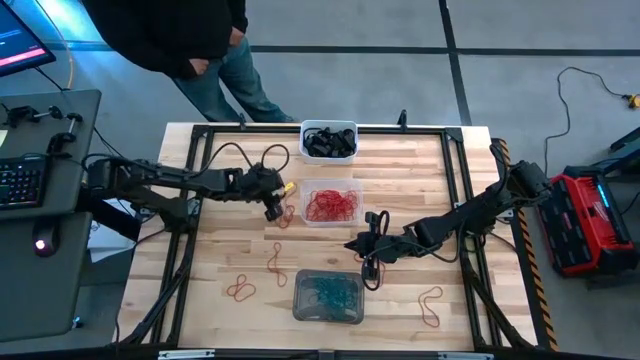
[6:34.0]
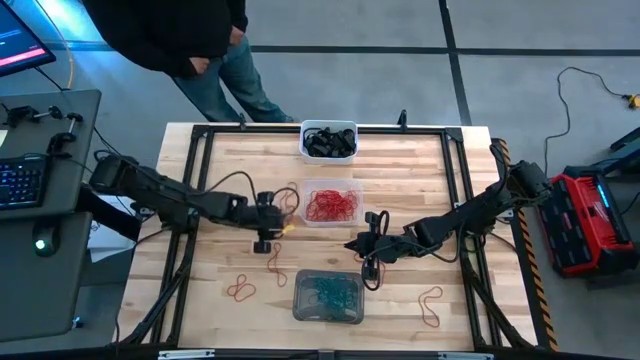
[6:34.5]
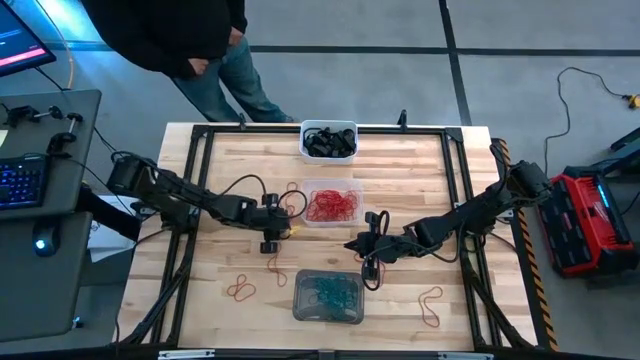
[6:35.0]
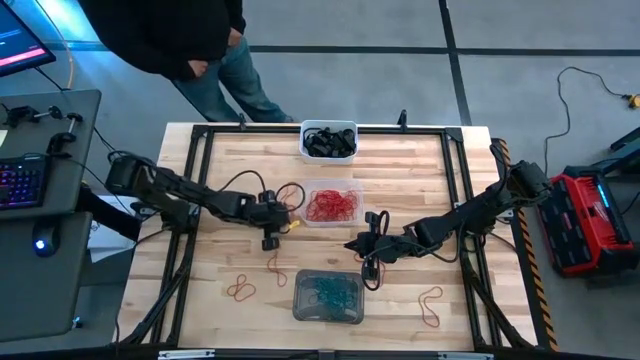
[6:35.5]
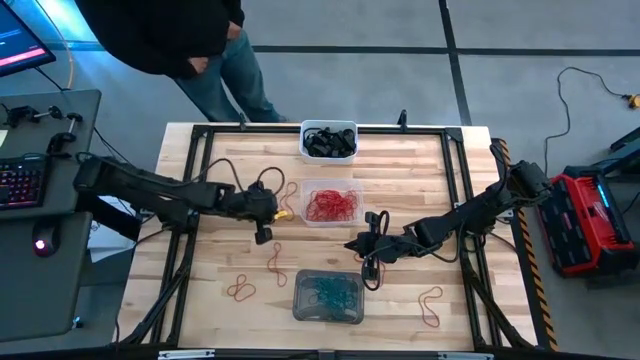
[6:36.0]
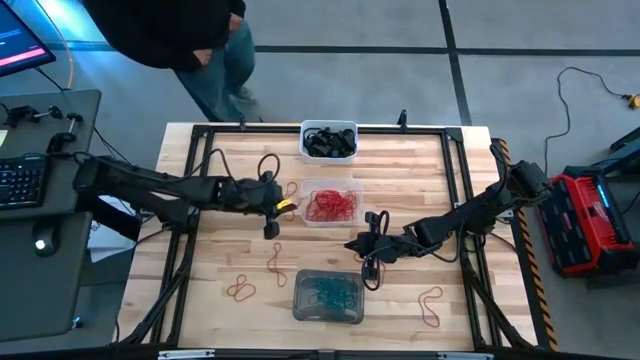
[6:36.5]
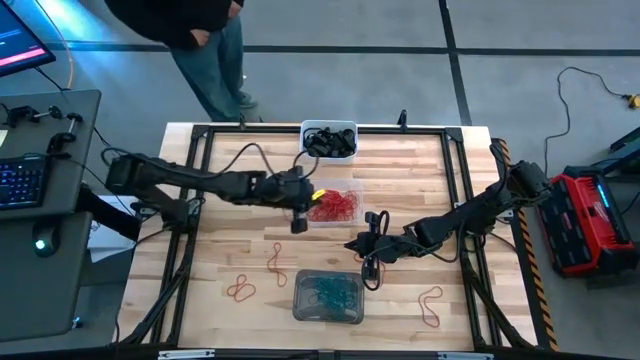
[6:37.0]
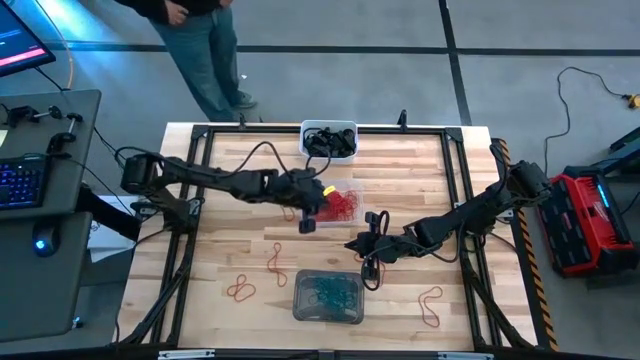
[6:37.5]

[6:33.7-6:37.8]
Task: Sort rubber bands into baskets
Put the red rubber band into the transparent bin

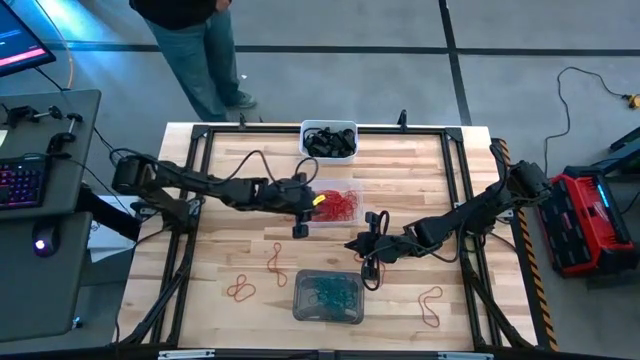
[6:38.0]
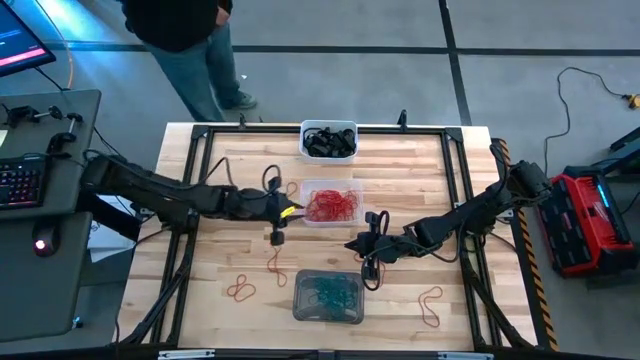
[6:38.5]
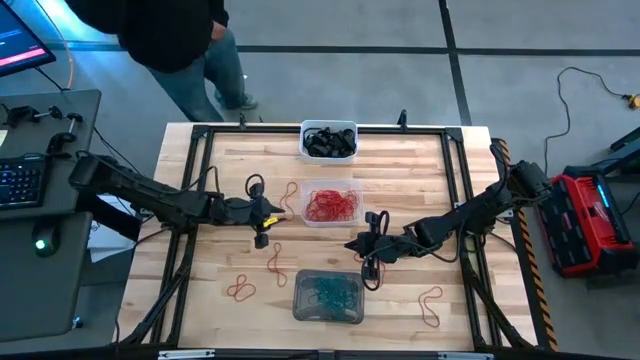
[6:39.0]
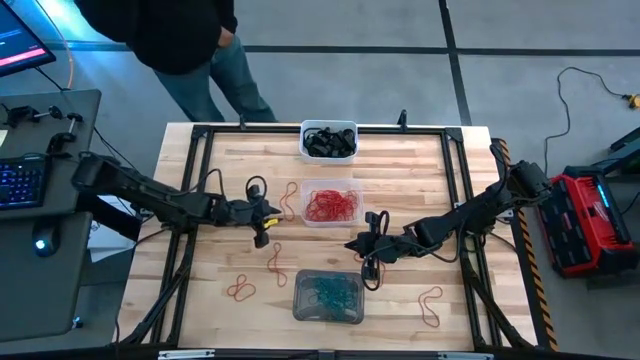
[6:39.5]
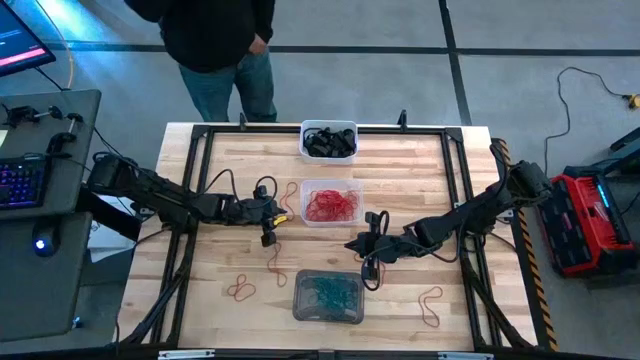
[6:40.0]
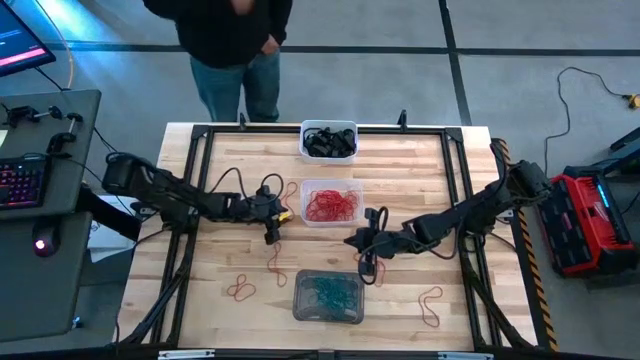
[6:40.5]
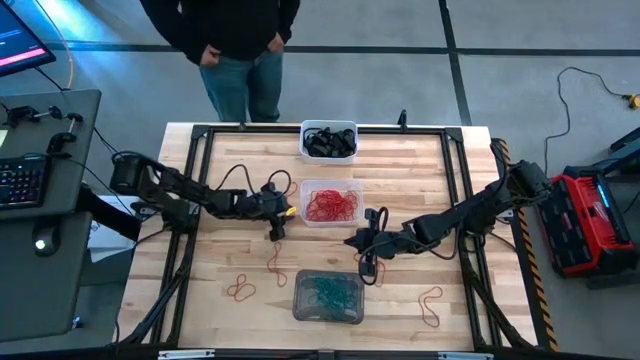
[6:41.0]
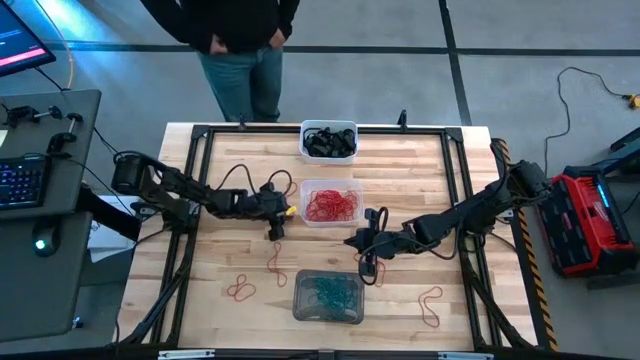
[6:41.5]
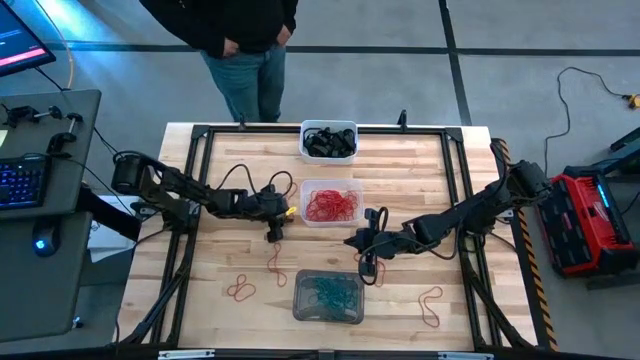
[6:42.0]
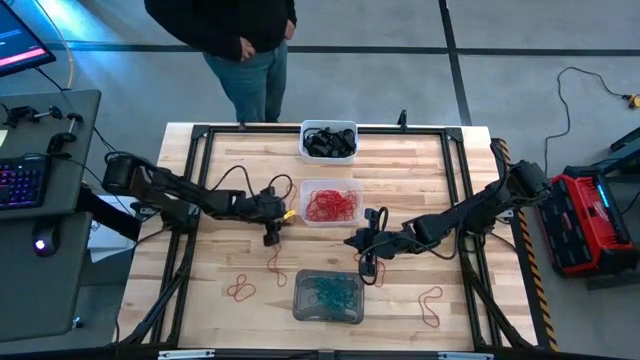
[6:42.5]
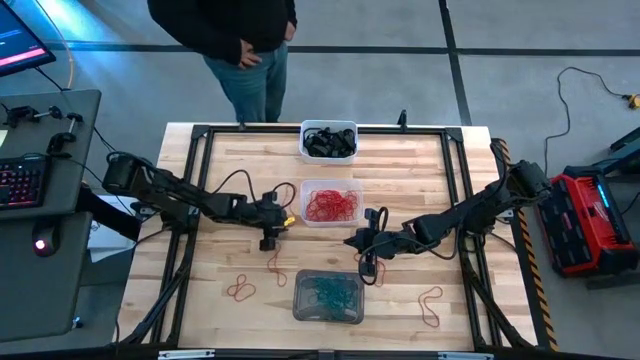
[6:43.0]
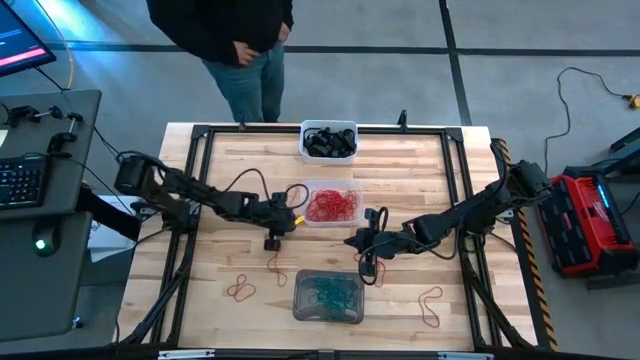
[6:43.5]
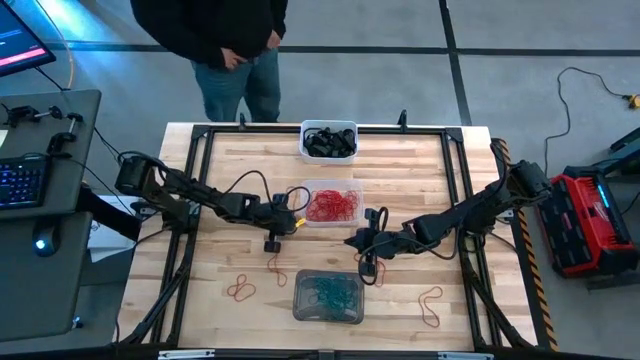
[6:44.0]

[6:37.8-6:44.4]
Put the red rubber band into the transparent bin

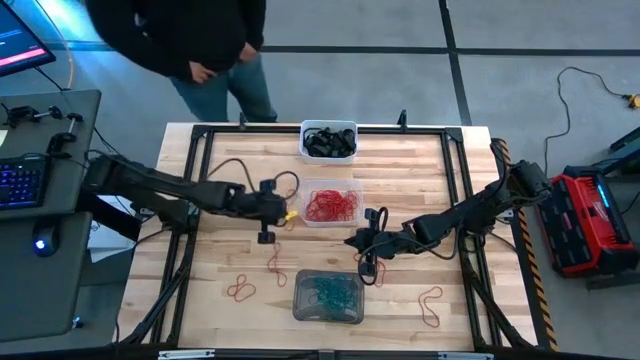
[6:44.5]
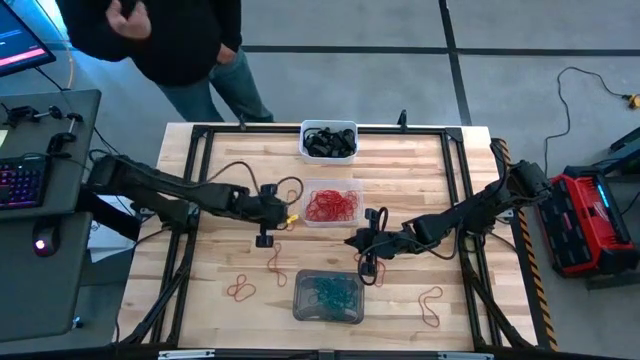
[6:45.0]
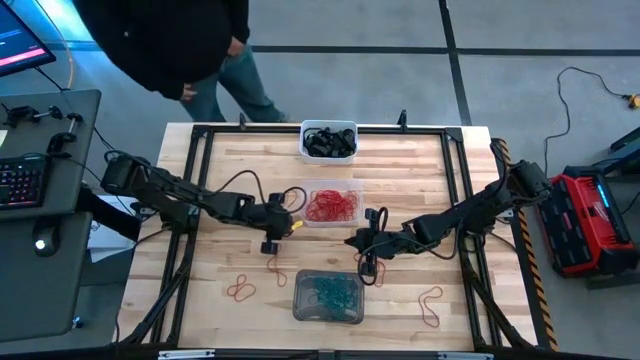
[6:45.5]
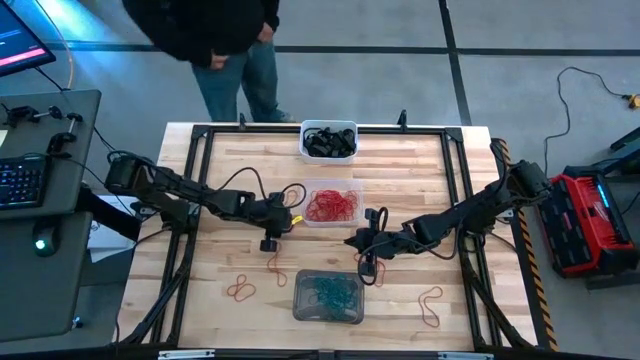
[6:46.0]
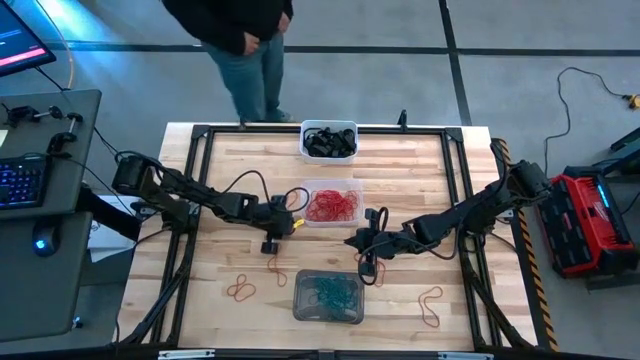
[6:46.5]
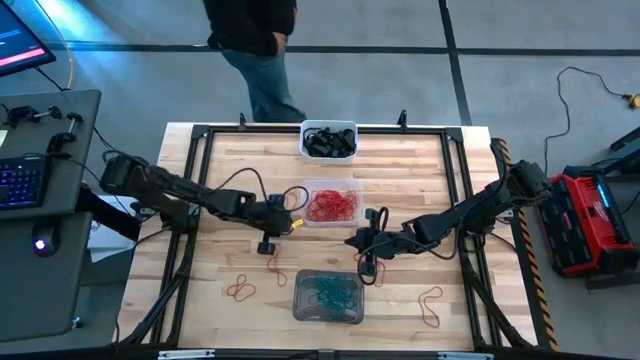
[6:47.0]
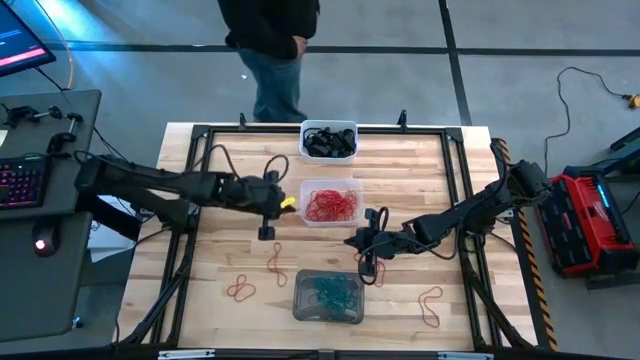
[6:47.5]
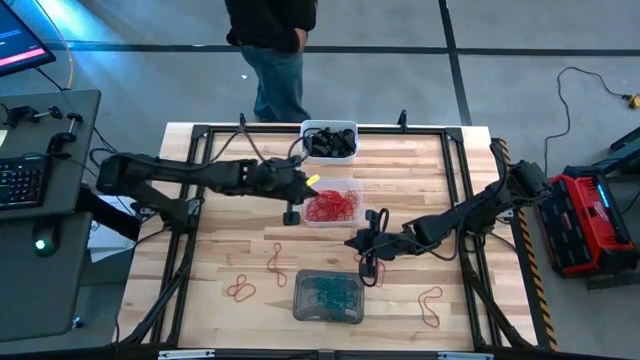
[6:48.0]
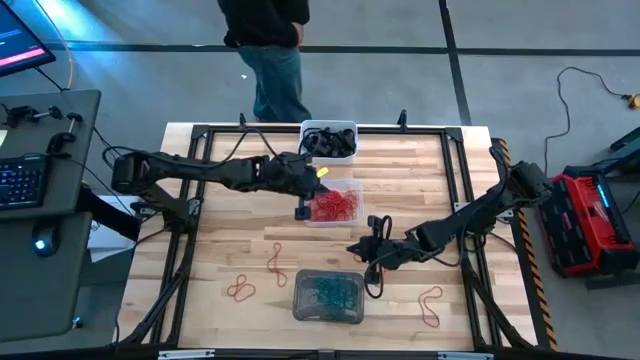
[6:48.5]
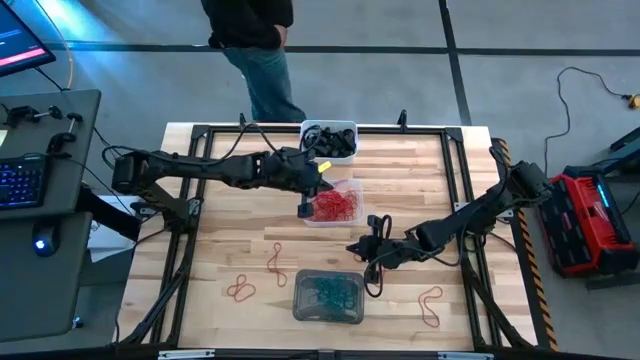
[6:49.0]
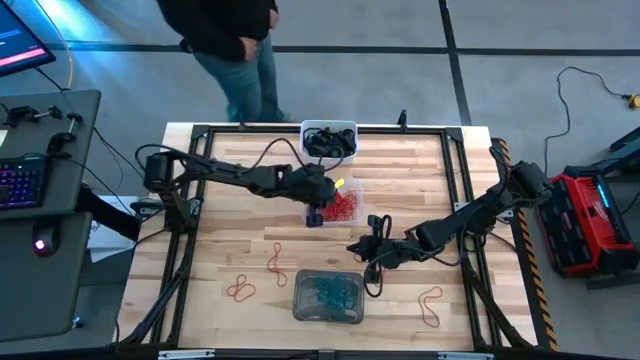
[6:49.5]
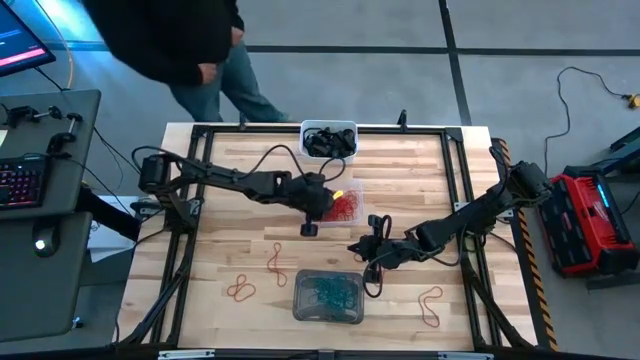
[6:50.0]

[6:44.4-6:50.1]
Put the red rubber band into the transparent bin

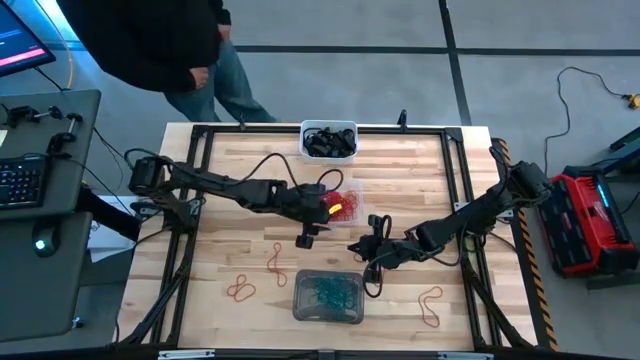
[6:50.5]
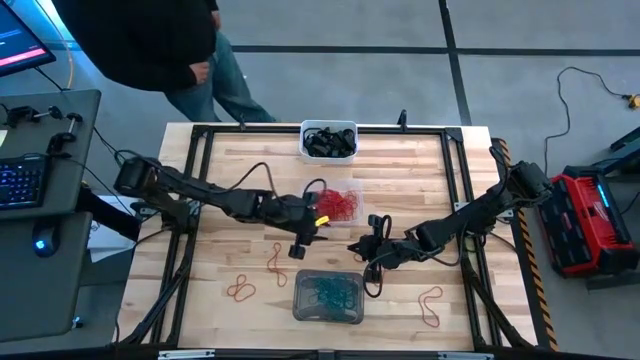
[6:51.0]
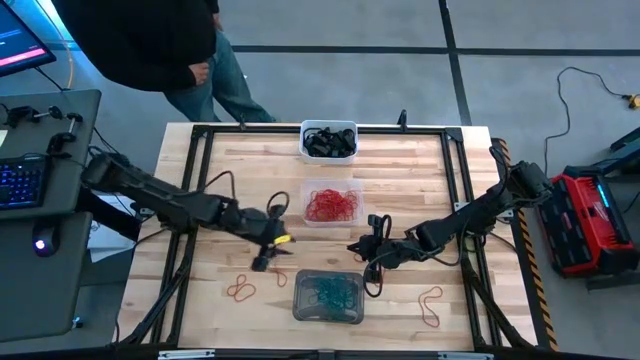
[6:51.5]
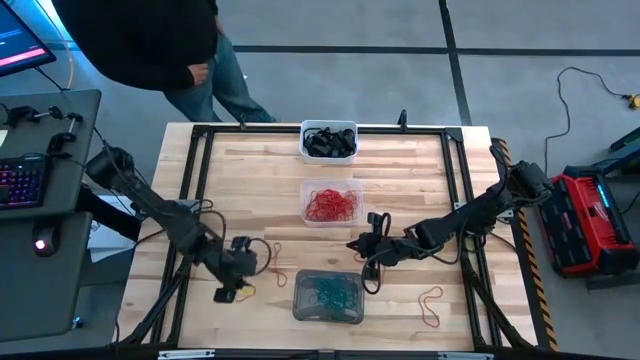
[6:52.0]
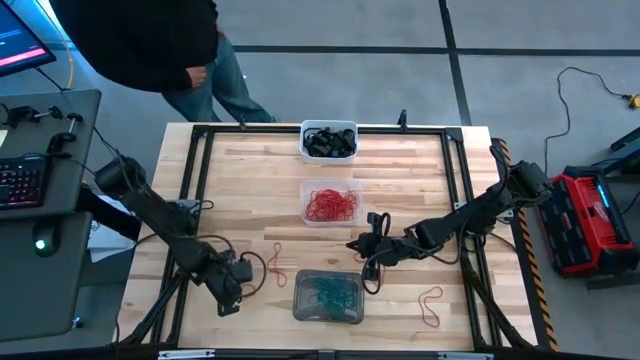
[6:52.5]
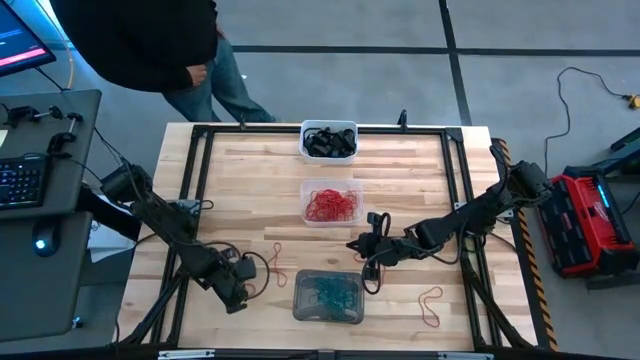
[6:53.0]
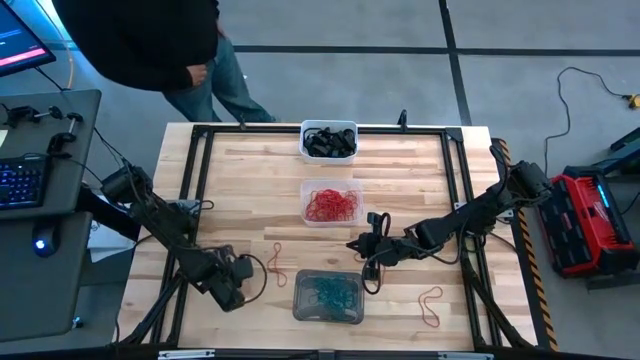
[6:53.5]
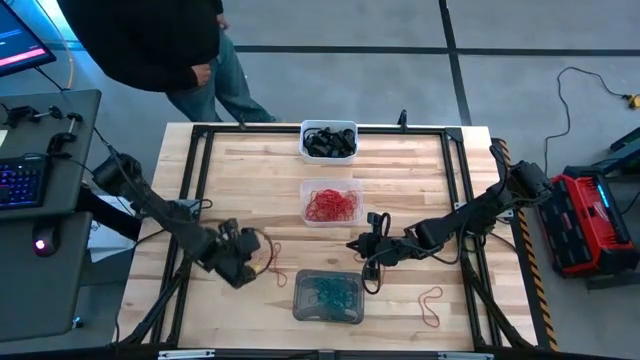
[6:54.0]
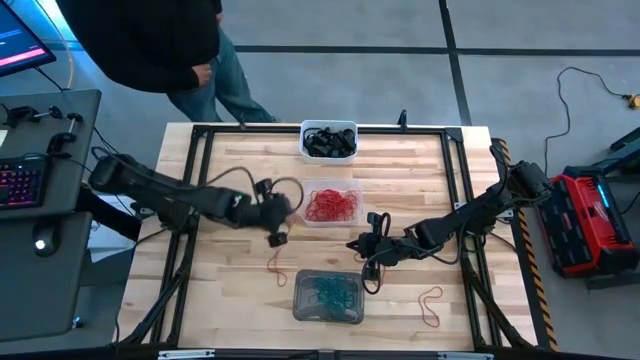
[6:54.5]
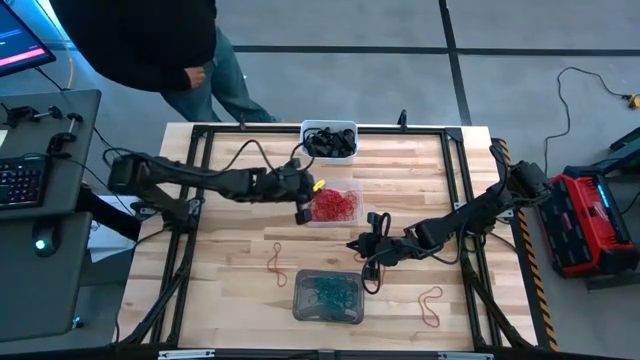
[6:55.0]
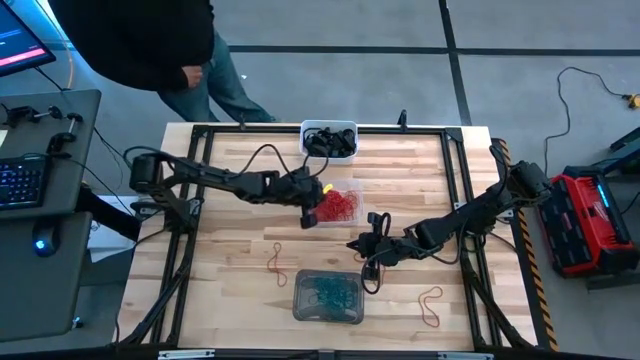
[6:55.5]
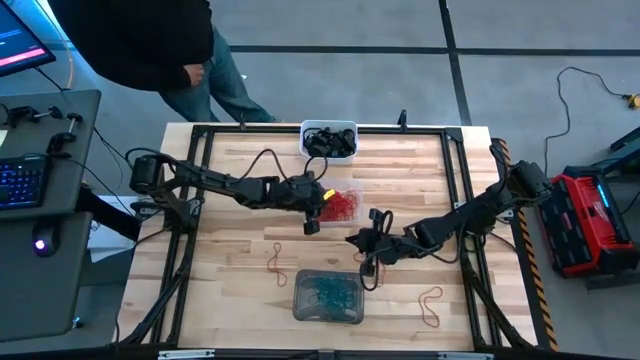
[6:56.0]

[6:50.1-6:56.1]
Put the red rubber band into the transparent bin
